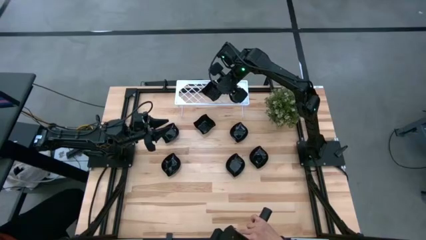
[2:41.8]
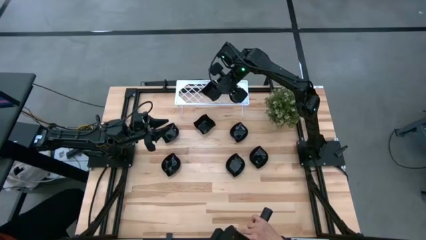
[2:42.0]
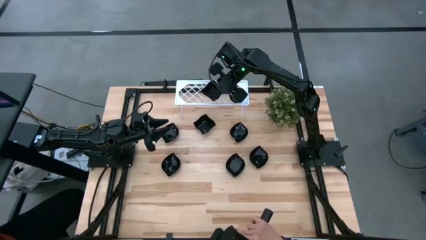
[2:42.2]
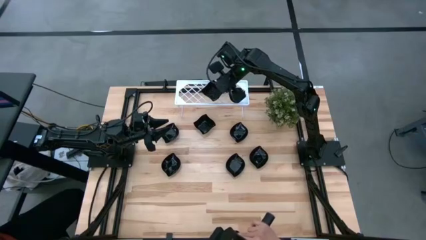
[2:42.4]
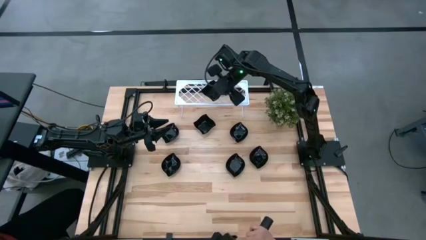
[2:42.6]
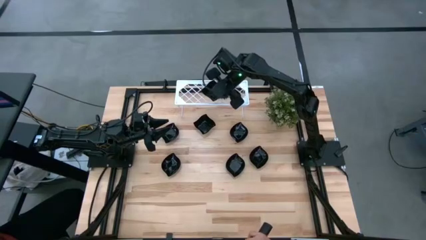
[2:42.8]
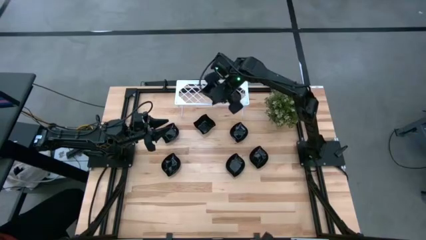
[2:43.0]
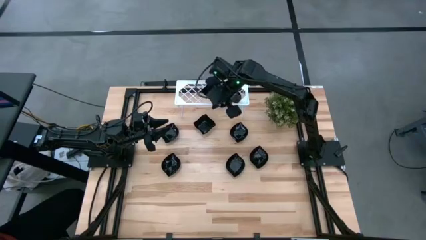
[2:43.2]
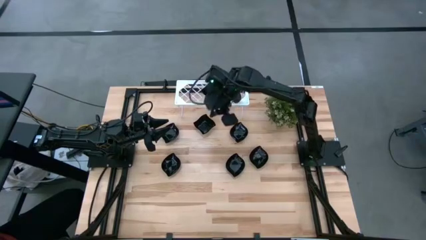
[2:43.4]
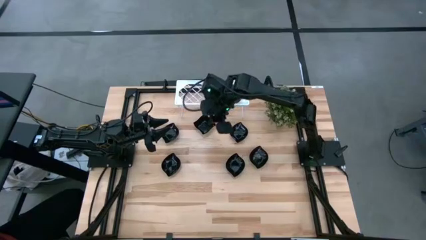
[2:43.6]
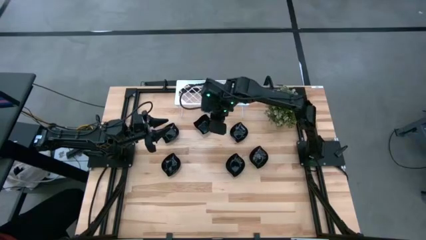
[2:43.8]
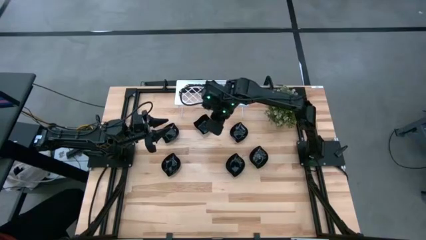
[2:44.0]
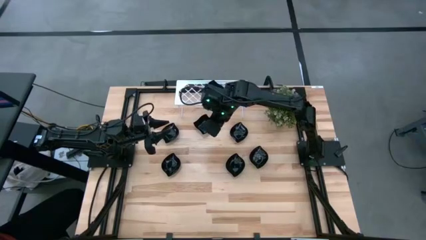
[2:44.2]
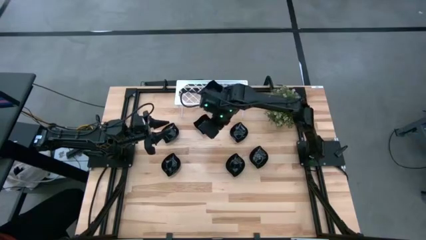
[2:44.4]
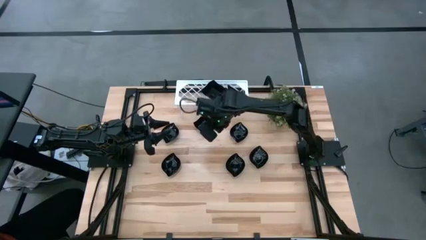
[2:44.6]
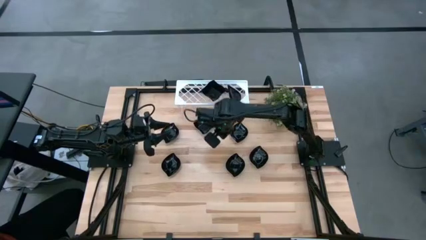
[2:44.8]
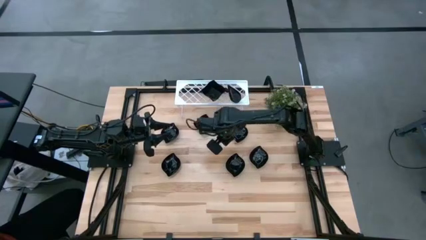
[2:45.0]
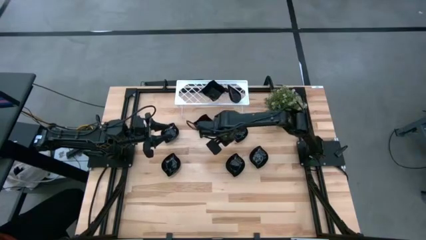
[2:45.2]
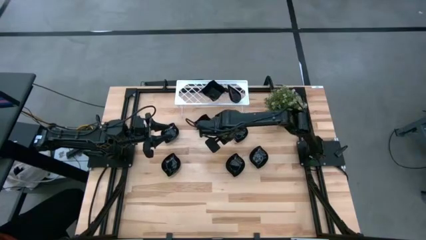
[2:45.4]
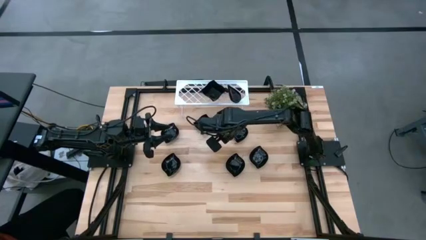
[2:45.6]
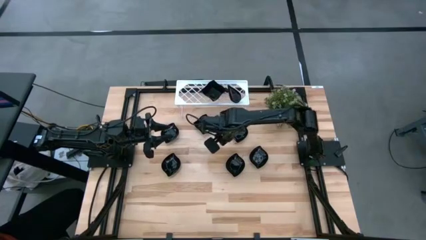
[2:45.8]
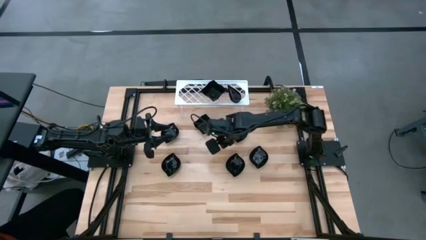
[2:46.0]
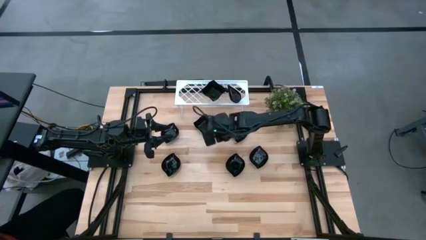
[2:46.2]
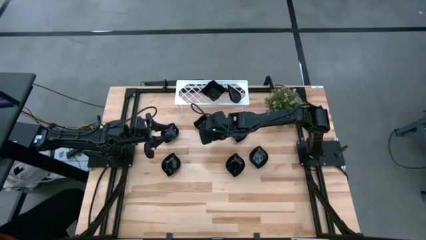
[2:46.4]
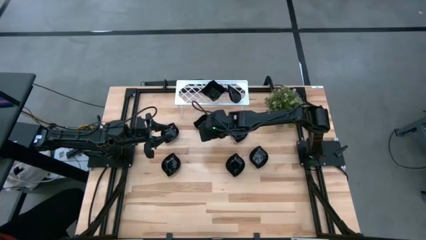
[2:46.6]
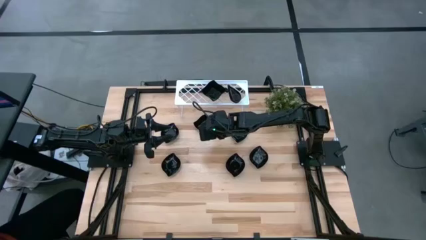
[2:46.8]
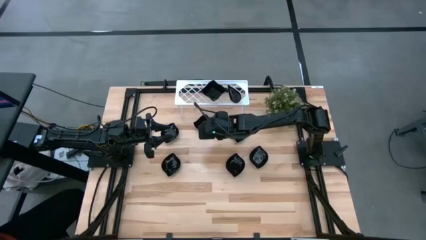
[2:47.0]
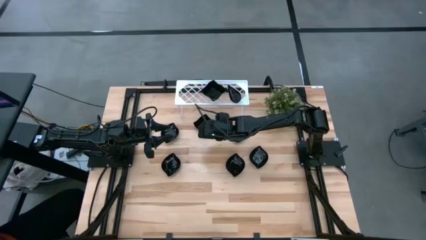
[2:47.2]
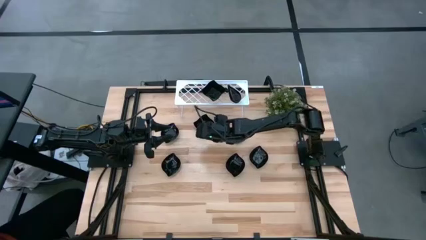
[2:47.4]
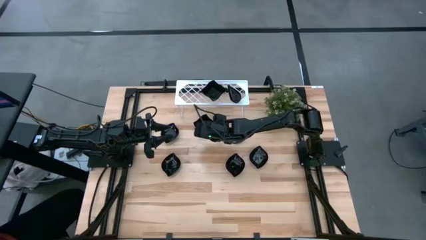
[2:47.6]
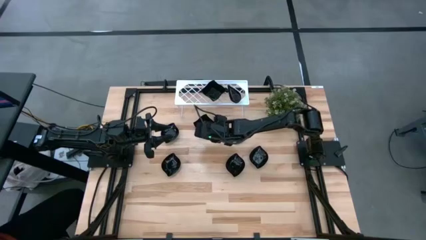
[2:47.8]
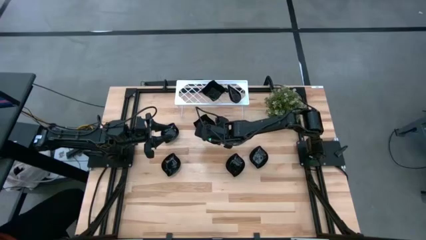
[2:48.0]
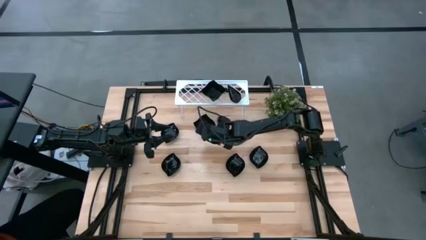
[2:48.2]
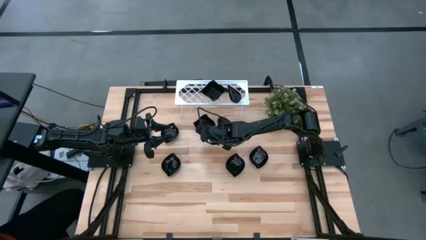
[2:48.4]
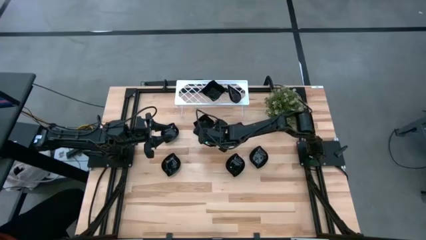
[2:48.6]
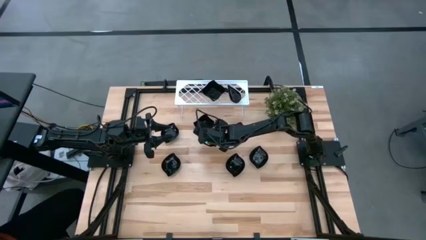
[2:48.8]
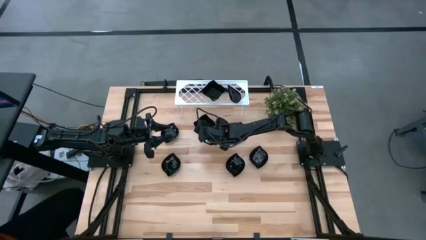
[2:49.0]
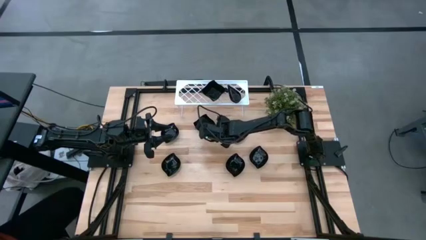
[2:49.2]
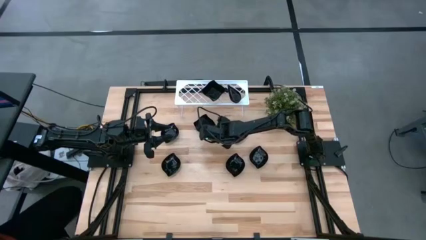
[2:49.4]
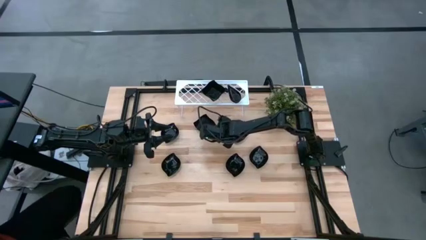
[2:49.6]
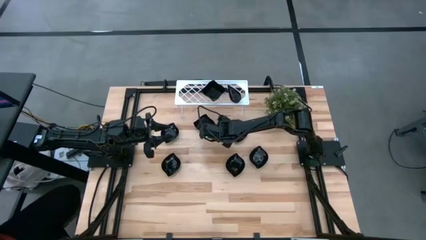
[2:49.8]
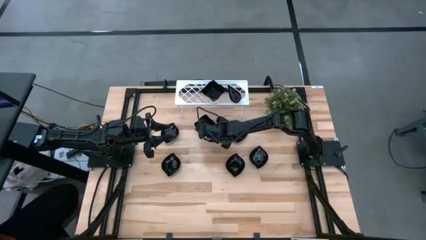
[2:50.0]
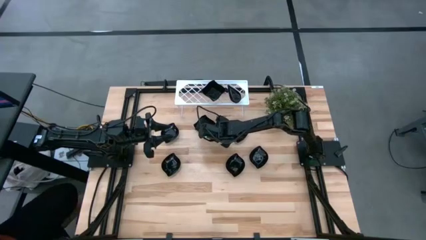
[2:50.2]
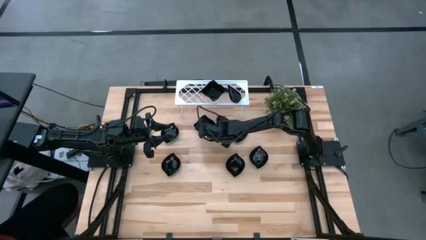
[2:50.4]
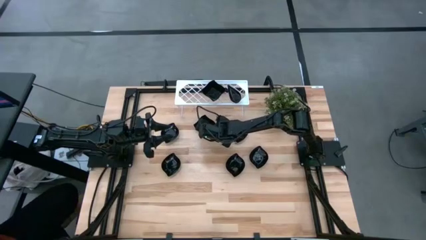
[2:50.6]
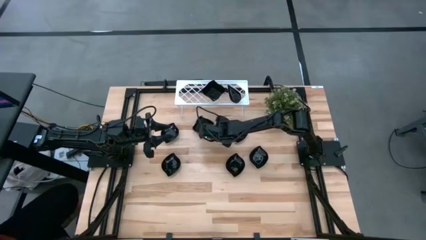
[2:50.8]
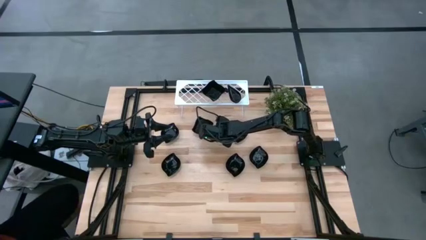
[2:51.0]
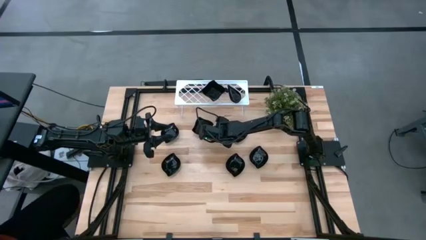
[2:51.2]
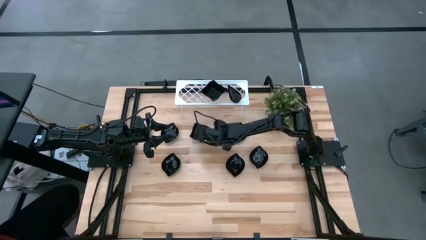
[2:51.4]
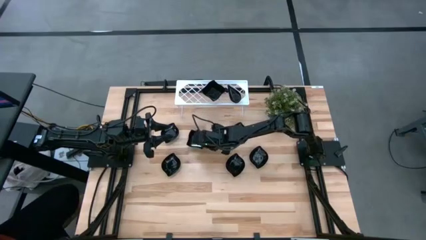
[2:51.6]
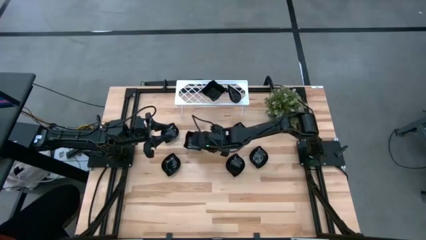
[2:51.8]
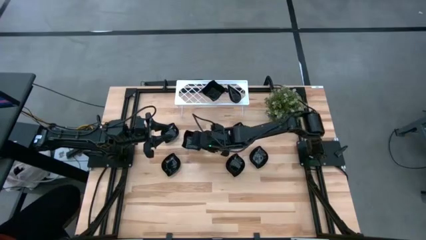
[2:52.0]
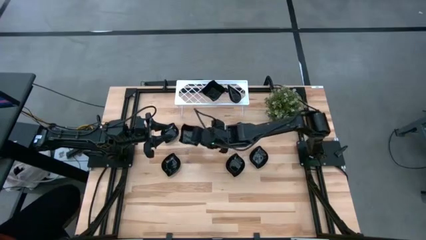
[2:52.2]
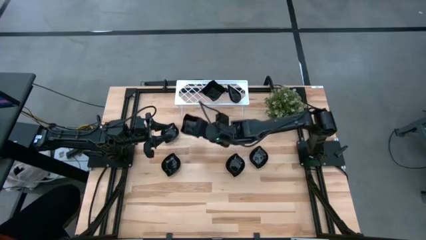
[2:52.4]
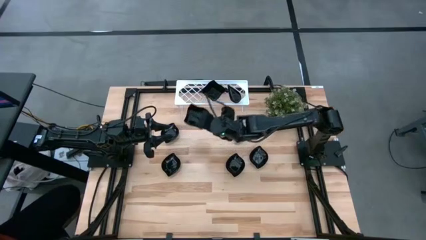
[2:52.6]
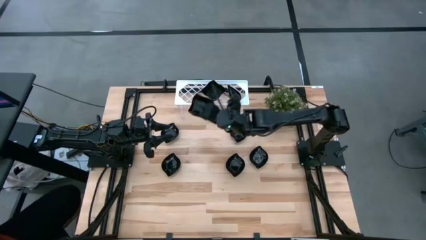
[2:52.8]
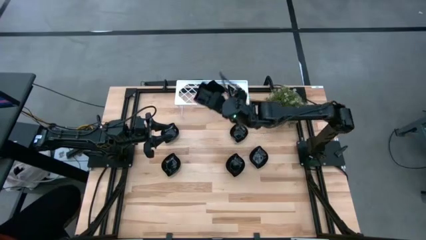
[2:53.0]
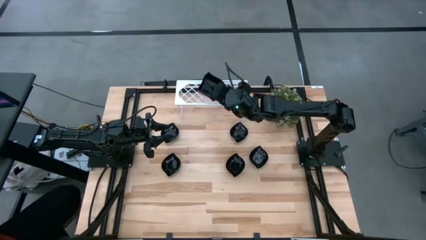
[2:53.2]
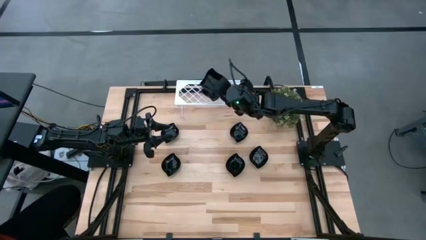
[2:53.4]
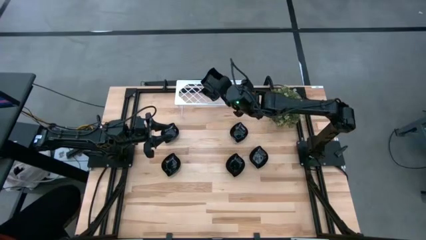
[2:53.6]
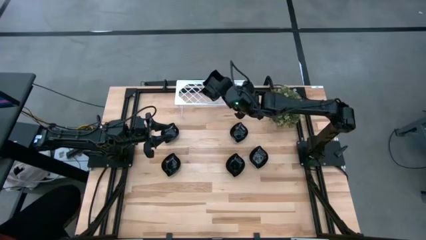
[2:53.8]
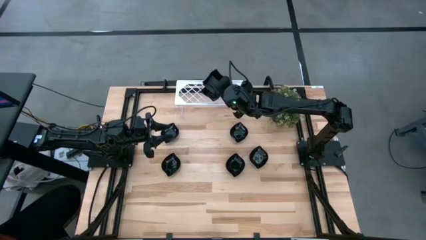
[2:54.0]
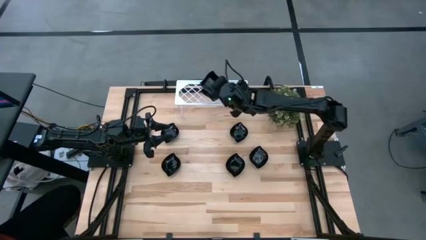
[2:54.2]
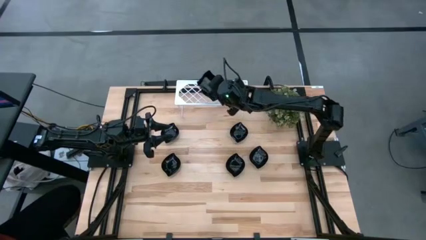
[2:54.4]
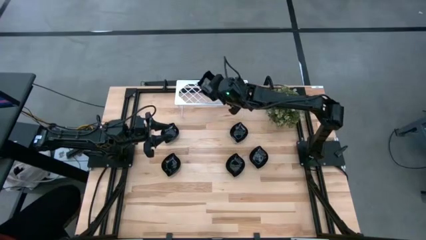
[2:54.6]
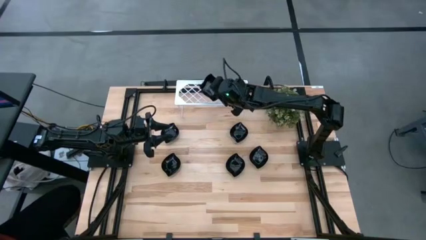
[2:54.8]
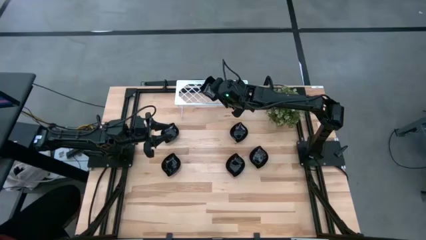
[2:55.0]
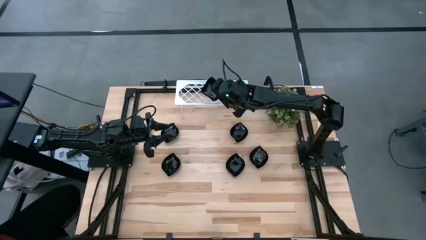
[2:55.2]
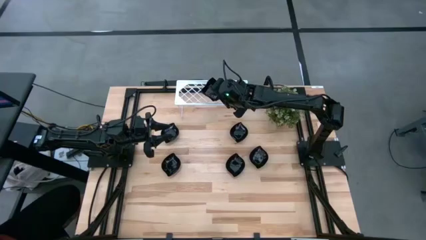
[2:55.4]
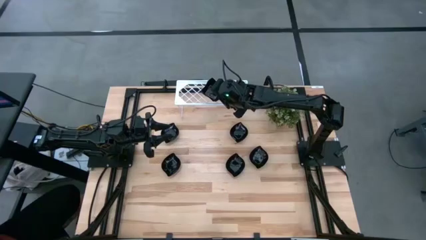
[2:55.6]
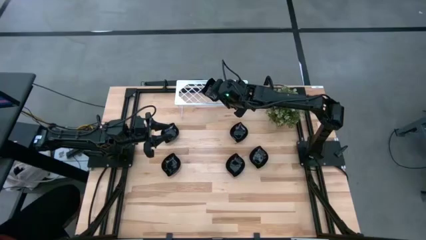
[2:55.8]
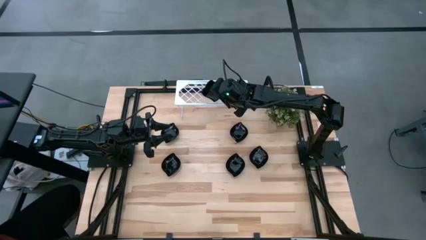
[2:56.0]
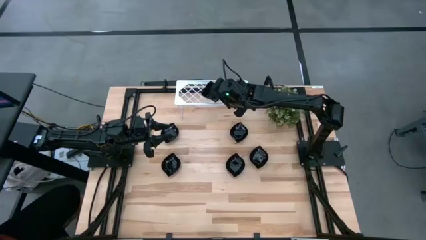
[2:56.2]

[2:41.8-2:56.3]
Task: Pick & Place Mini shaped plates
Stack the distorted square plate on top of the other distorted square plates on the shelf

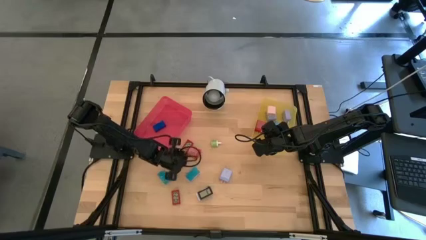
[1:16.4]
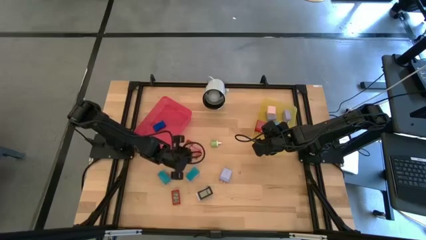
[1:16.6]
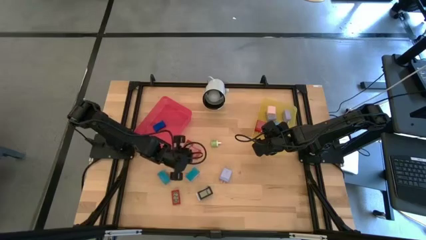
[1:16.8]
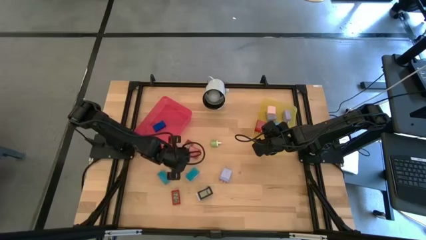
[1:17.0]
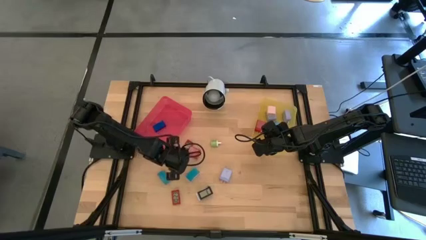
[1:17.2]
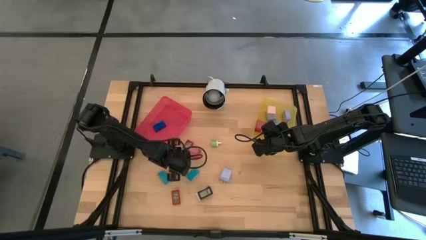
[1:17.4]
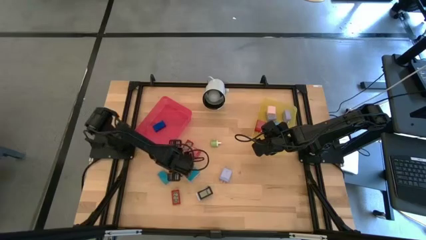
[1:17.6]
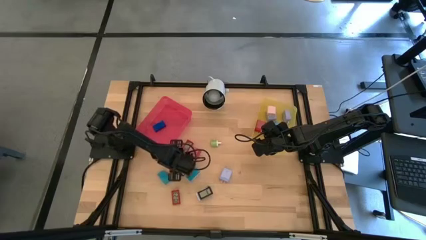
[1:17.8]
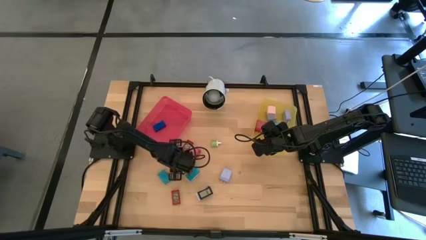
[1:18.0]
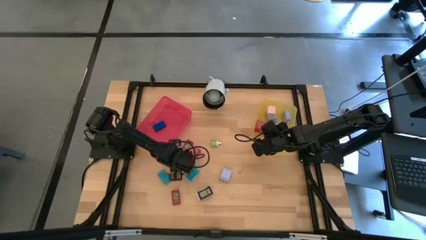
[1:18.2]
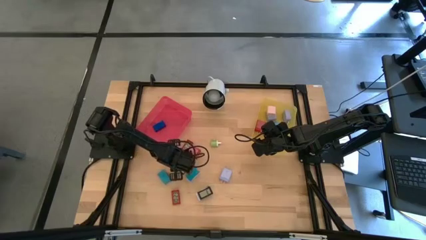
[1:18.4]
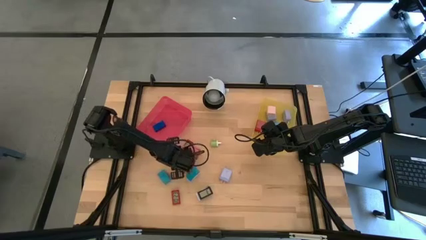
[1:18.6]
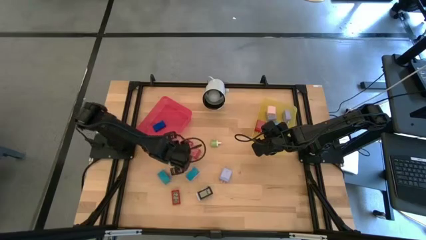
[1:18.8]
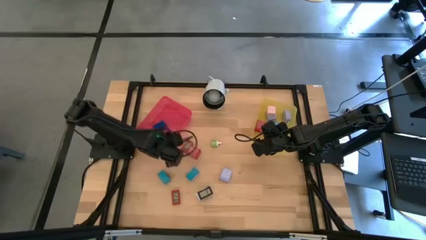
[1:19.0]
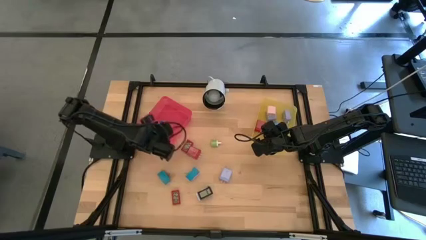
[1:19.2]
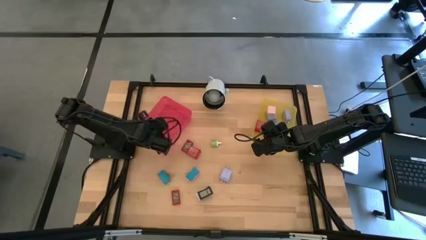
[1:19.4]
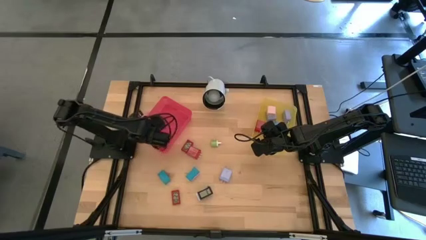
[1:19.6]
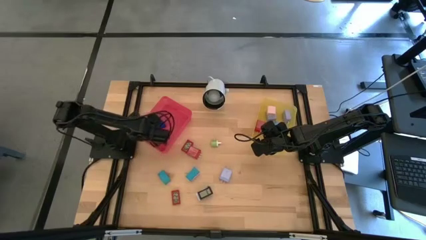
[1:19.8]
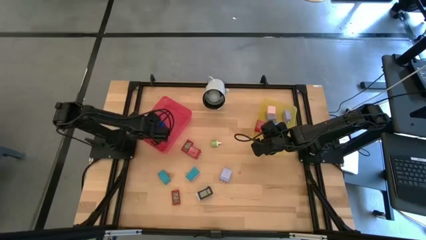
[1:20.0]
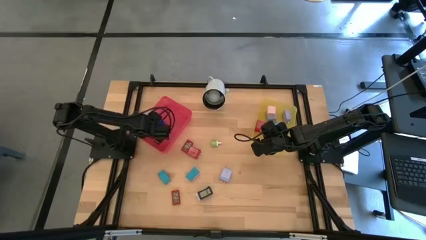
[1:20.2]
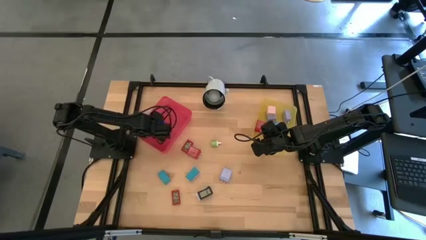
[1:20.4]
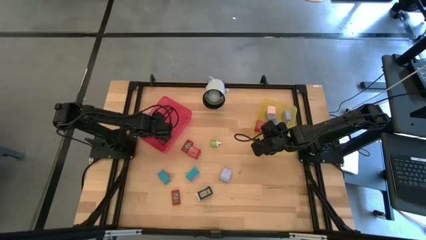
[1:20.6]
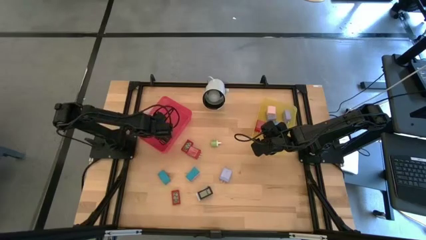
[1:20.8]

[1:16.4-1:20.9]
Task: Pick & Place Office items
Put the middle red digital timer into the pink bin
